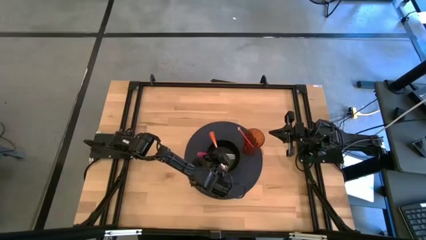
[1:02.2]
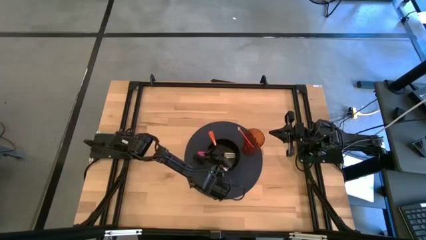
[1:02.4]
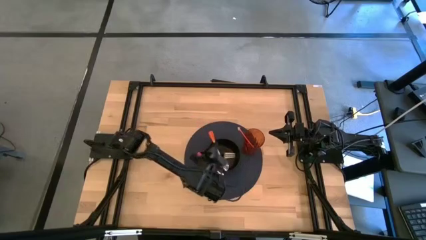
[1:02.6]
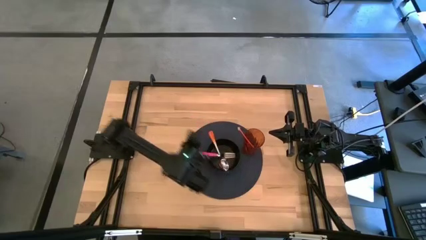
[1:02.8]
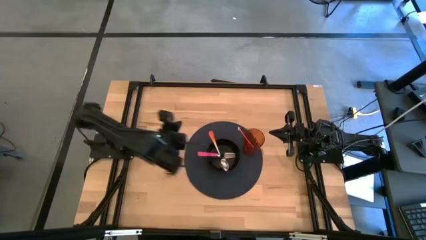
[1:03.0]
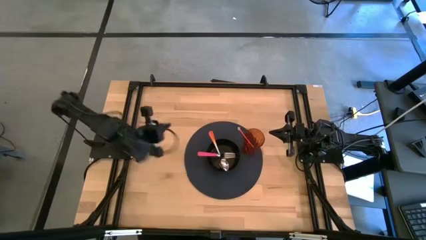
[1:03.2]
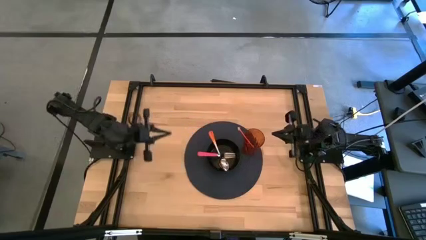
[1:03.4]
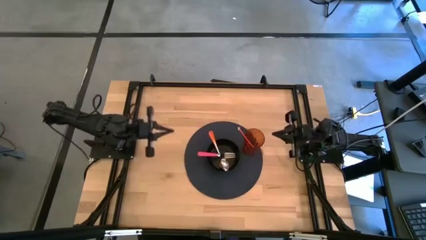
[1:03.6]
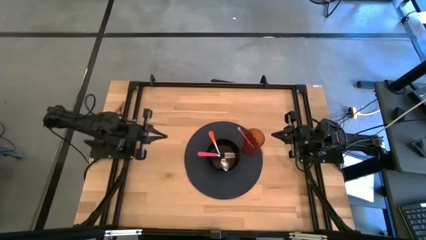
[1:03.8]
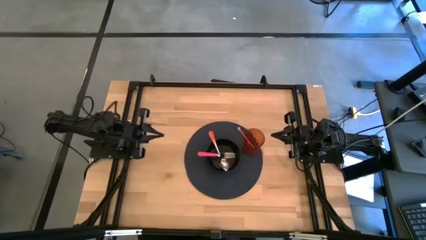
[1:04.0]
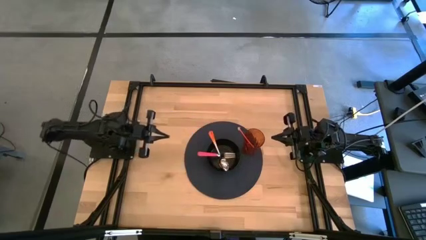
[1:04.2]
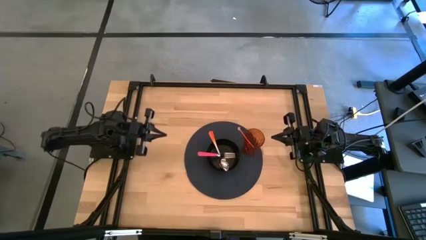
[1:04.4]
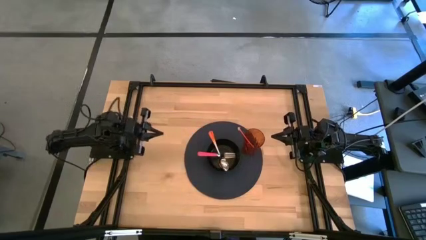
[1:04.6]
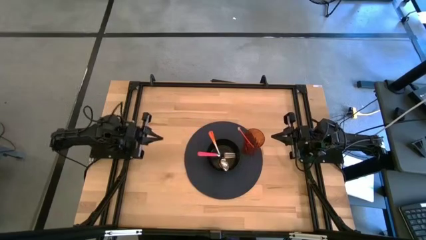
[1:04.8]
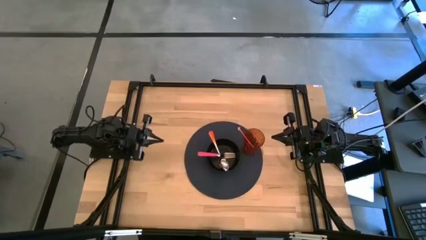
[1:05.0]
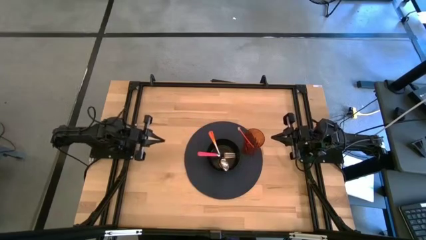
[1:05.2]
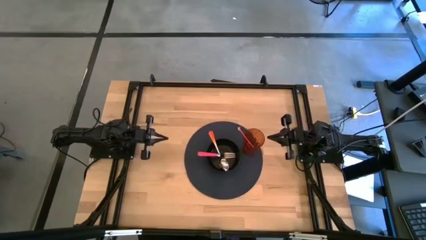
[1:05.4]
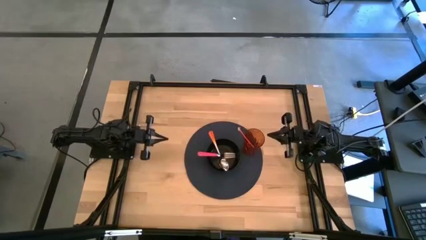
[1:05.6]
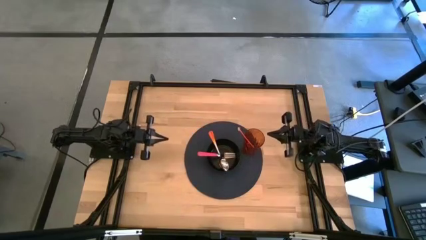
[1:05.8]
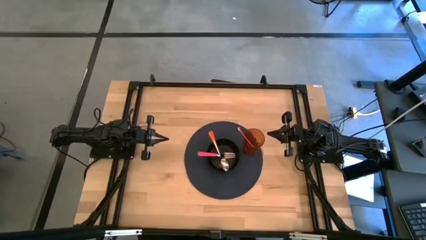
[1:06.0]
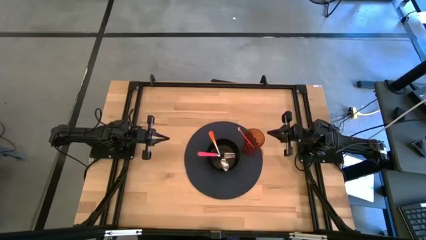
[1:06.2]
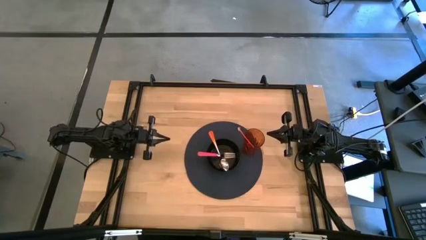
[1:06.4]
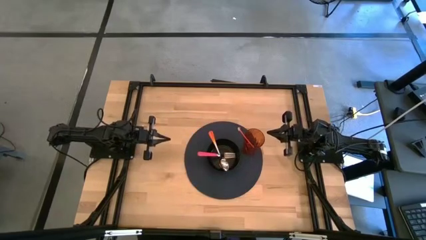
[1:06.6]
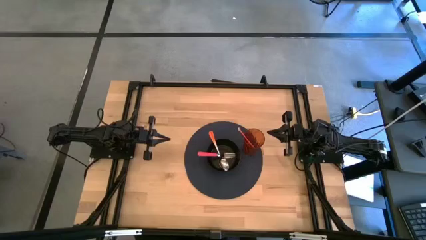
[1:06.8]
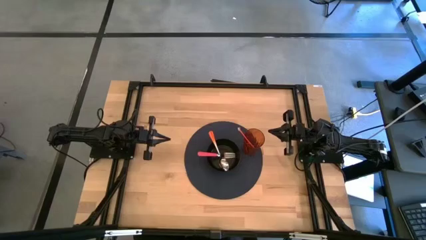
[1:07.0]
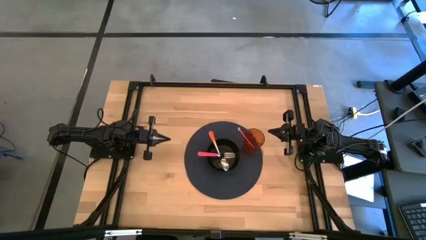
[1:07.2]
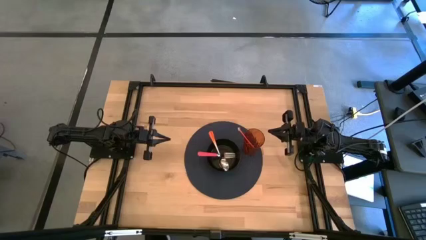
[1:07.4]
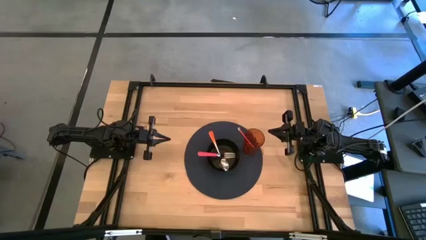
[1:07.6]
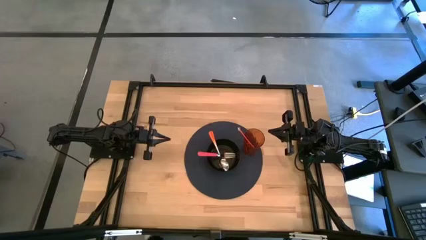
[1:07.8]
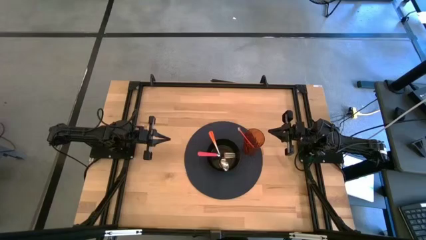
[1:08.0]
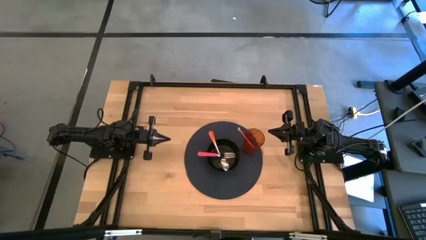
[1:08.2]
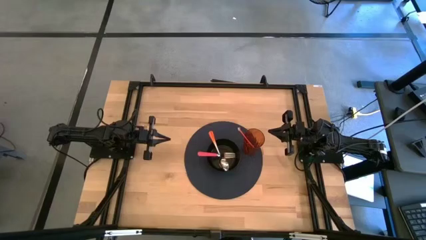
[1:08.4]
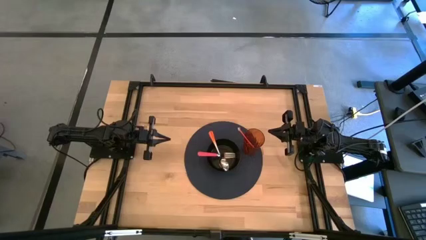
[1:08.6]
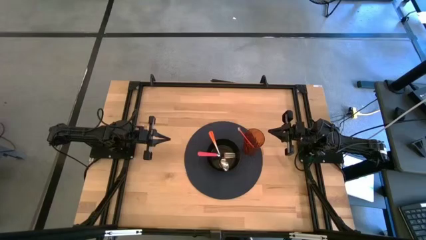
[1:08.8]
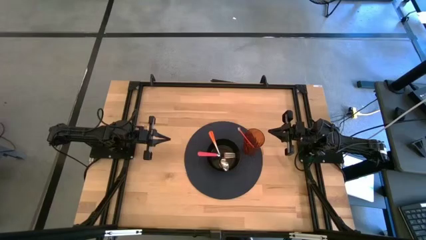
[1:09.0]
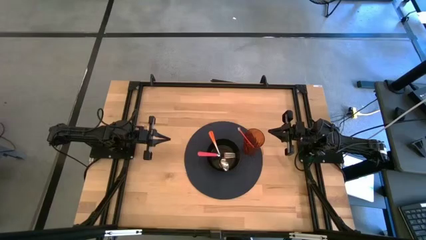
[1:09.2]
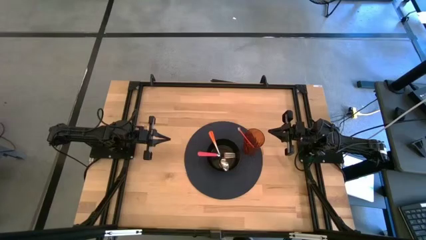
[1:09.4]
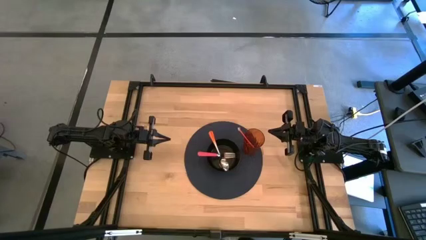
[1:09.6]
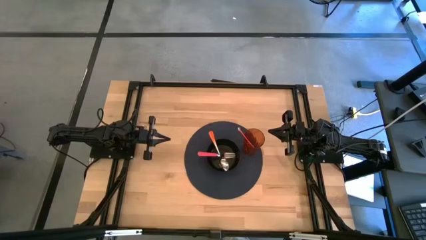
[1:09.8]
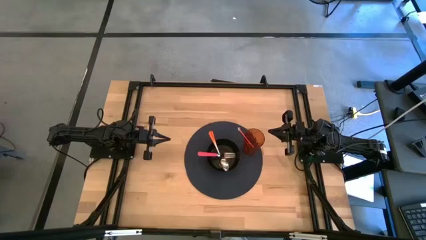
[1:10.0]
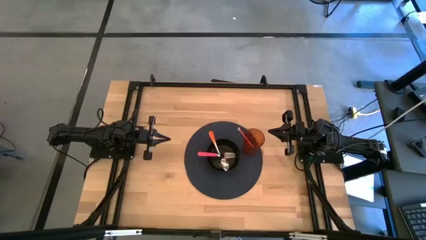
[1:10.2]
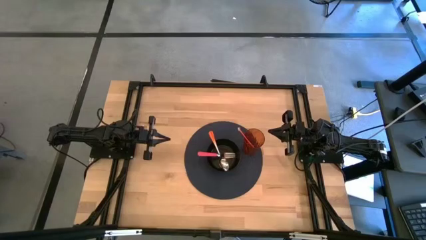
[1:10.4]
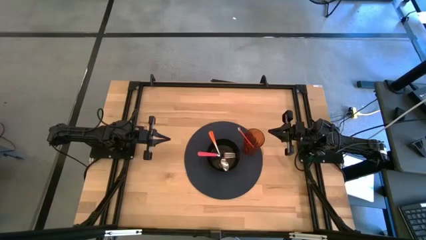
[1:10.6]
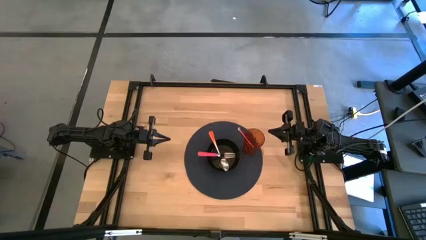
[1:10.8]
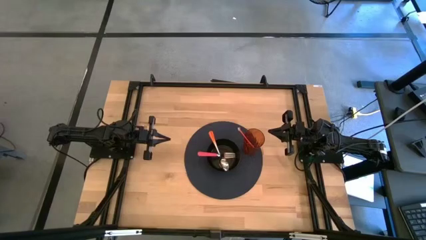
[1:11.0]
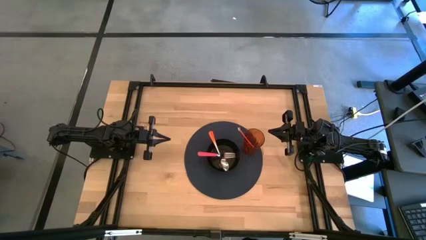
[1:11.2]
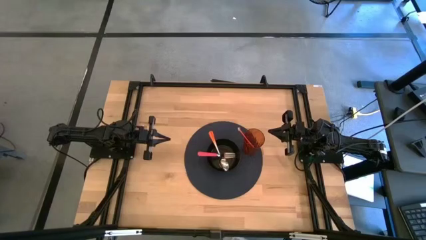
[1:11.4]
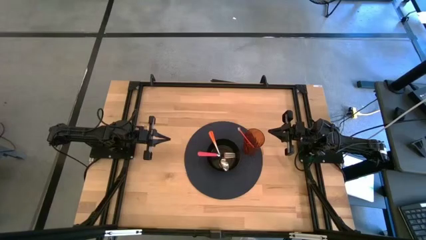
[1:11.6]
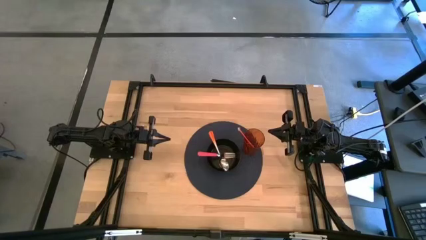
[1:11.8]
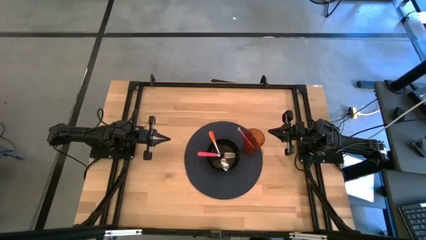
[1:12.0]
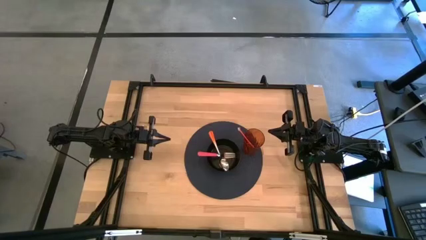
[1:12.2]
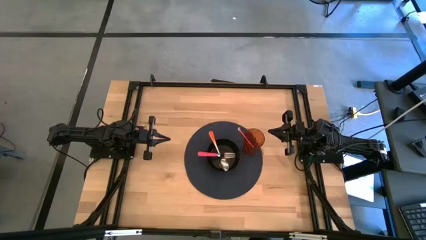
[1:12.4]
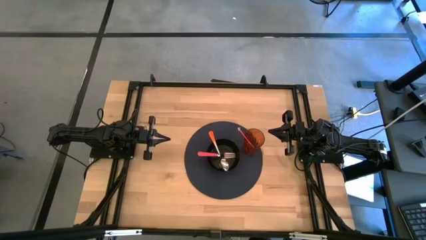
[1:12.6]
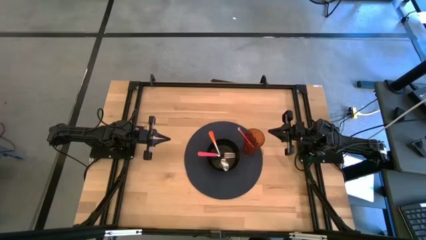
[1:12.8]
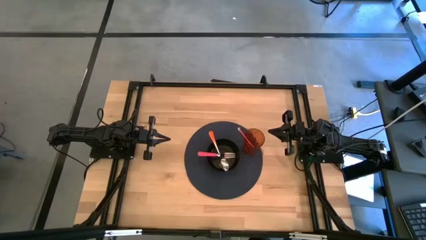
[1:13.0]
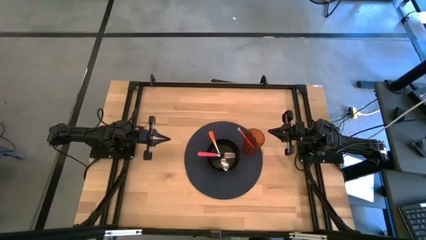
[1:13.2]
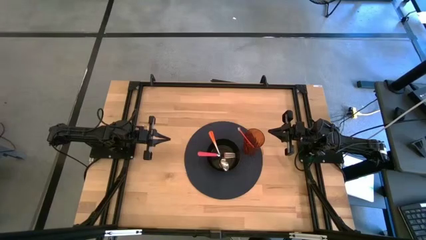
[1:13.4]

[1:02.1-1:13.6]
Task: Pick & Place Utensil
Return to Home Position

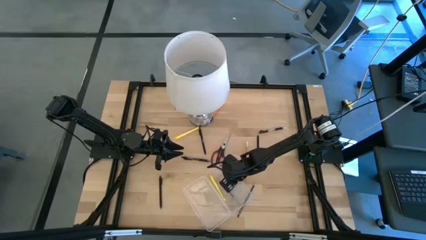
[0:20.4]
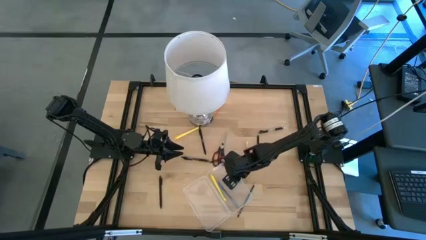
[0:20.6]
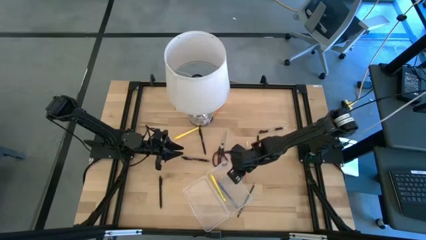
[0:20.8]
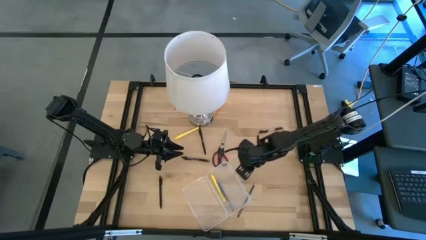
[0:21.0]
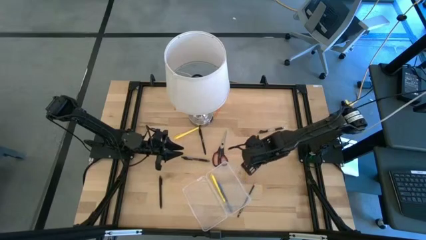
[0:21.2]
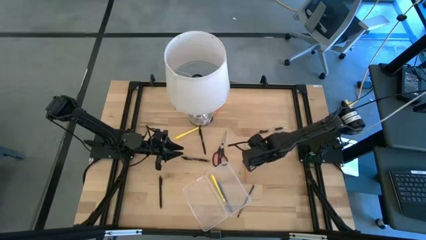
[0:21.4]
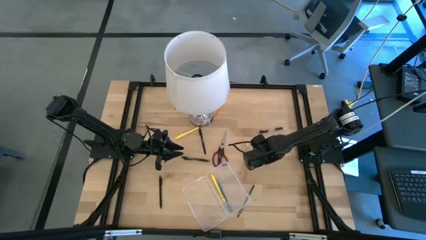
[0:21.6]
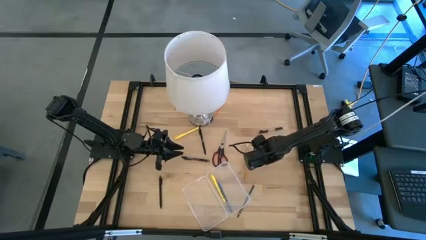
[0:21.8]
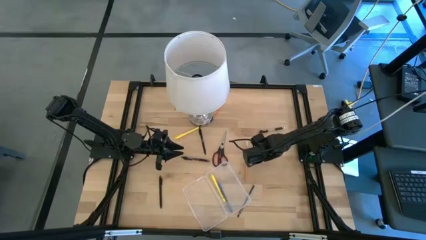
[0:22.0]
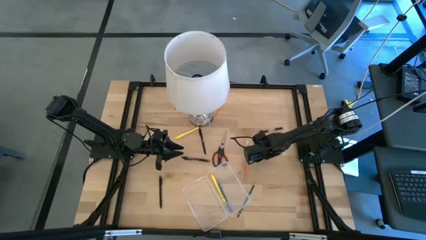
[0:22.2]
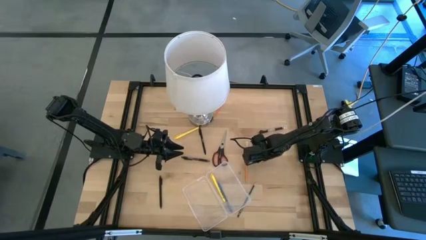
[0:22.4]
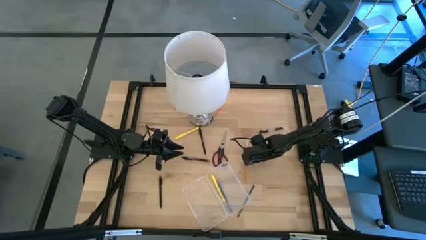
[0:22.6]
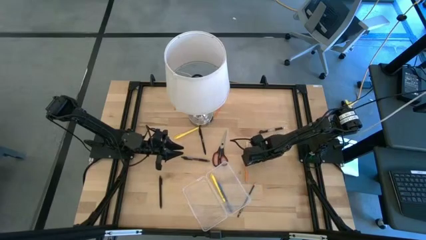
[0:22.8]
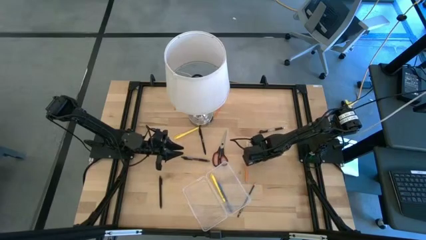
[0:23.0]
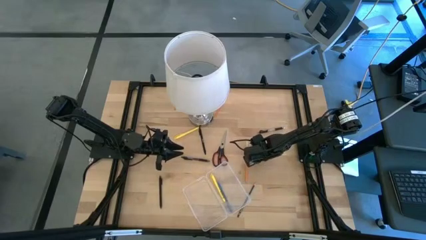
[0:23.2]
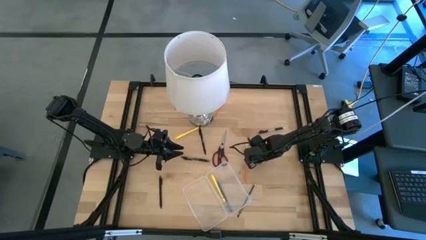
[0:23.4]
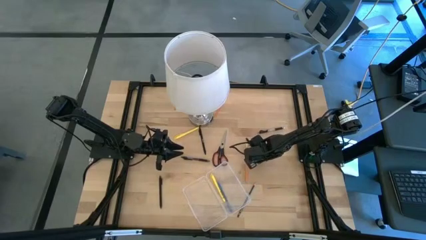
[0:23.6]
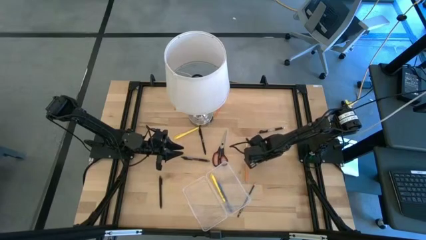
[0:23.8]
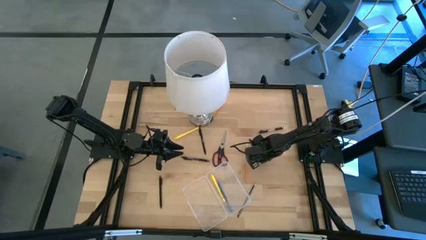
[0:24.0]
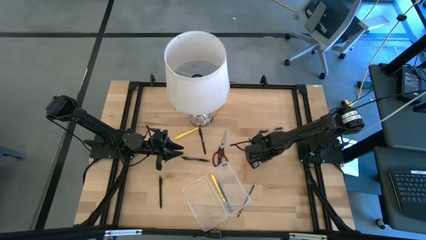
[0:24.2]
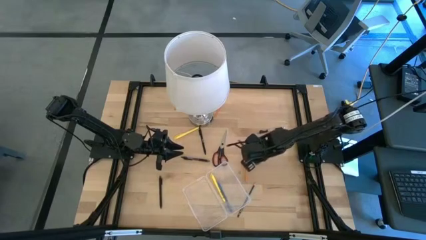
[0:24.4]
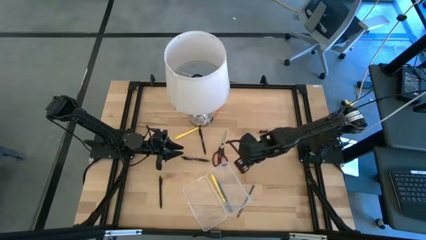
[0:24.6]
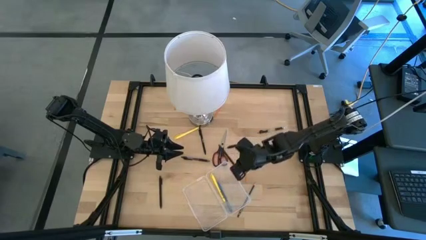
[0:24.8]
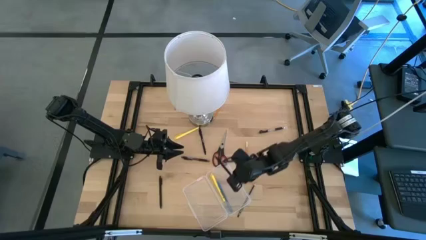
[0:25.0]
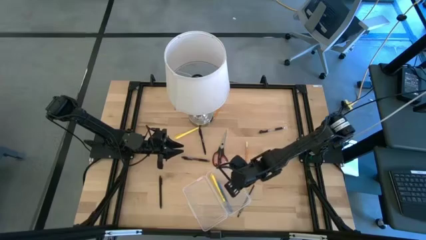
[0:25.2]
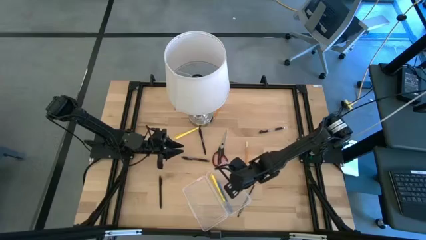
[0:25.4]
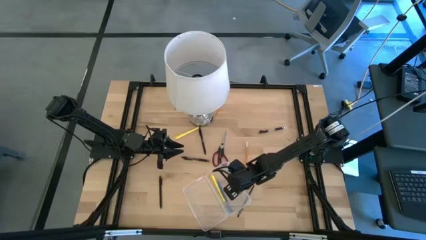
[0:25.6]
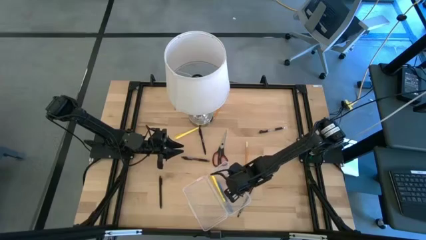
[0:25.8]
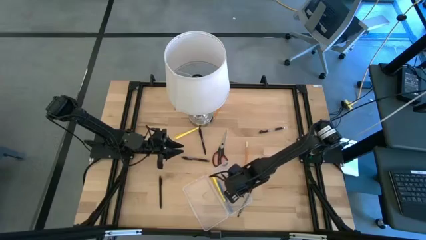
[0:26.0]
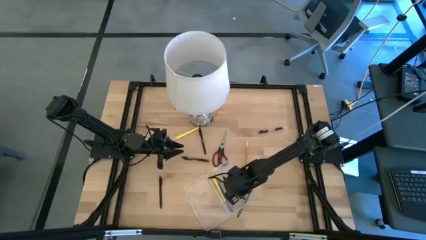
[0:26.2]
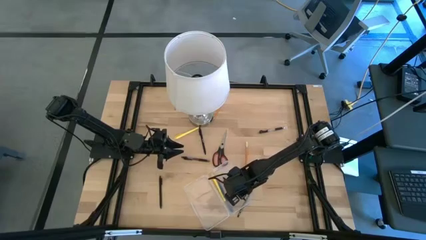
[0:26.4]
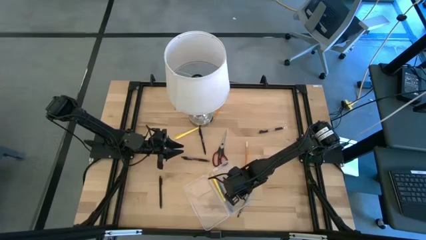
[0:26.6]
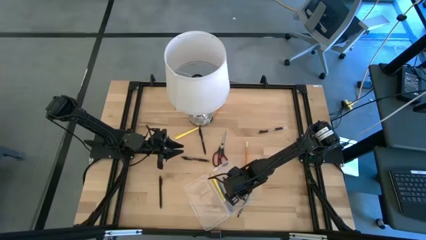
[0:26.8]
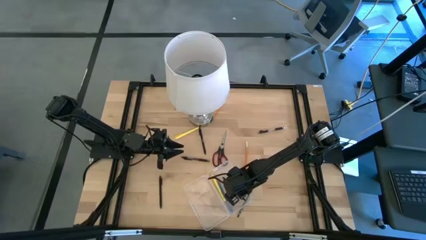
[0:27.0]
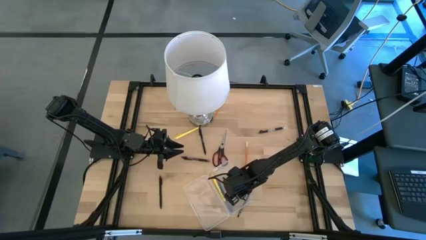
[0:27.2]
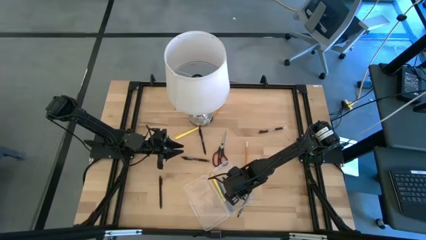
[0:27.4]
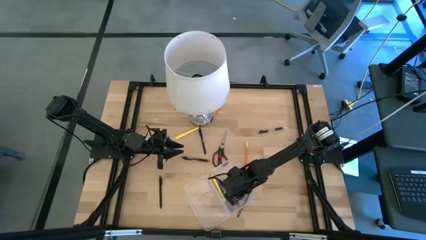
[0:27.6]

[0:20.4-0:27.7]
Task: Pick & place school supplies into a supply box
Put the top right black pen into the transparent supply box
